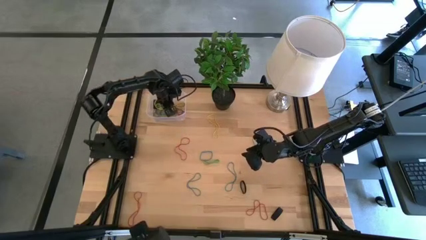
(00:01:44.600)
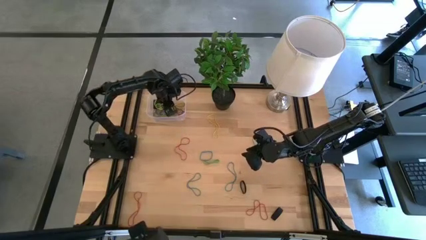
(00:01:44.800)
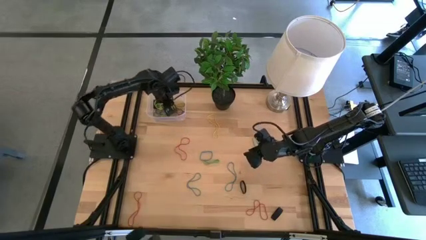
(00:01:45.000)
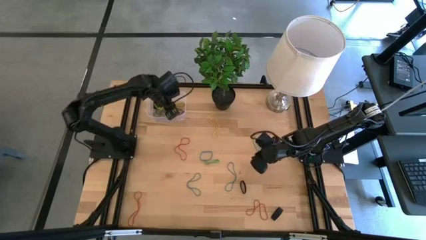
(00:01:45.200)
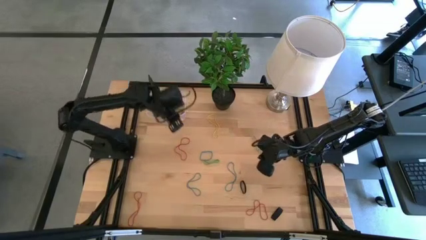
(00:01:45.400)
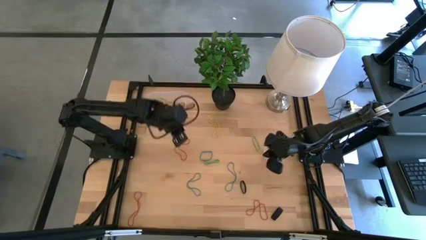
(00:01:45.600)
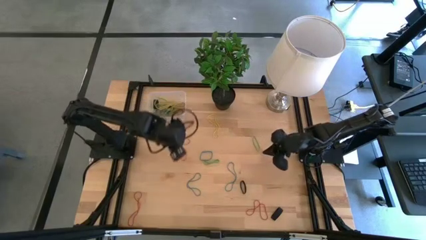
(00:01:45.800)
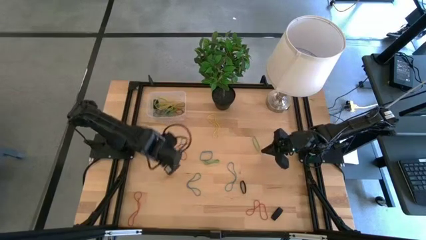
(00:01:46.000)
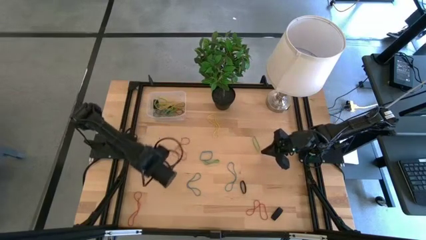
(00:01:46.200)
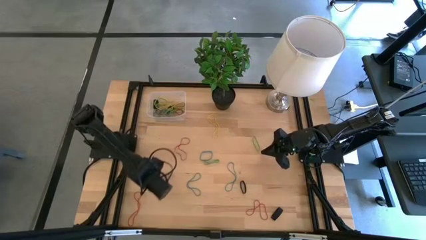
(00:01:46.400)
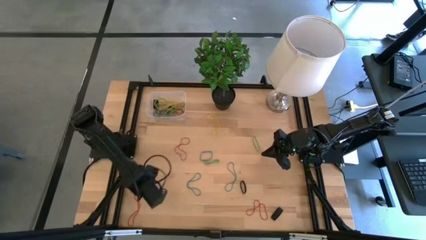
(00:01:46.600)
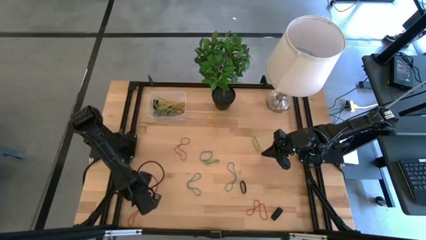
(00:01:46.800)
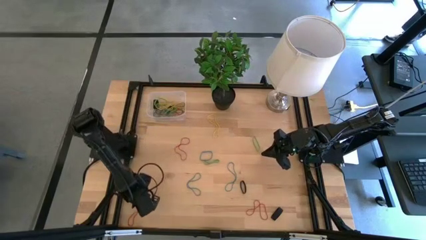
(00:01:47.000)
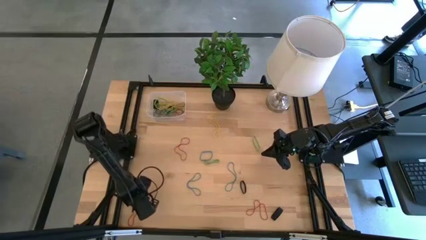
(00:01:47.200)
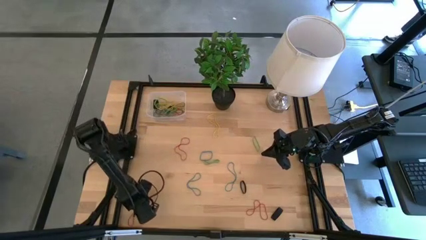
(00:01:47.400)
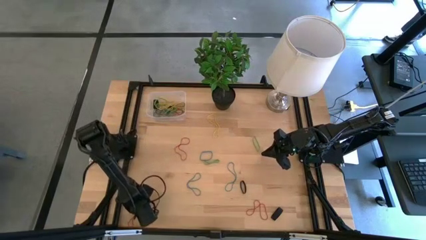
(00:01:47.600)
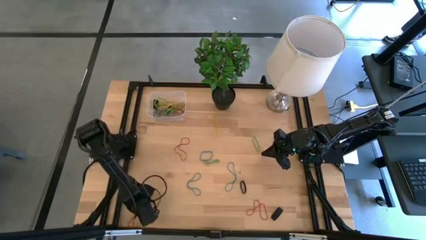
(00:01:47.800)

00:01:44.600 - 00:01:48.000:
Task: Pick and place rubber bands into bin
Put the red rubber band into the transparent bin

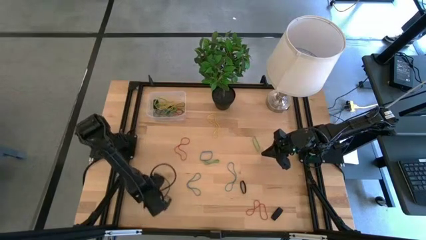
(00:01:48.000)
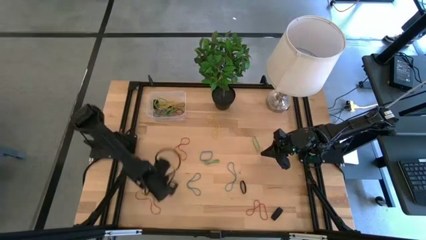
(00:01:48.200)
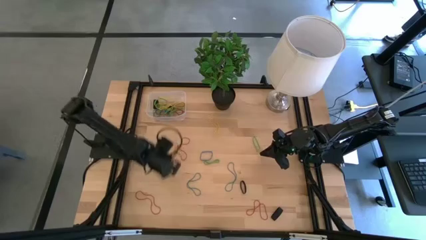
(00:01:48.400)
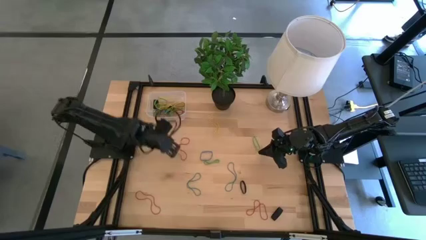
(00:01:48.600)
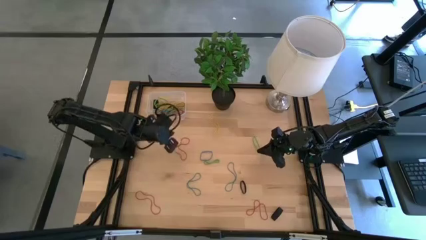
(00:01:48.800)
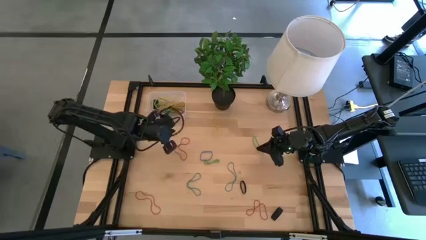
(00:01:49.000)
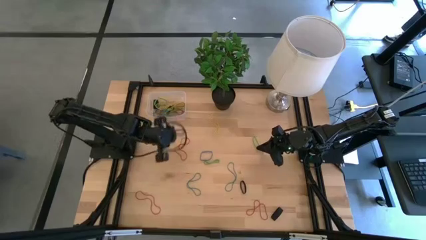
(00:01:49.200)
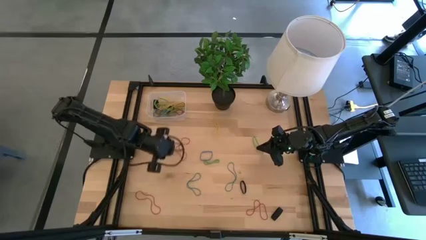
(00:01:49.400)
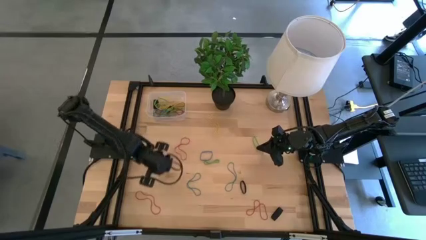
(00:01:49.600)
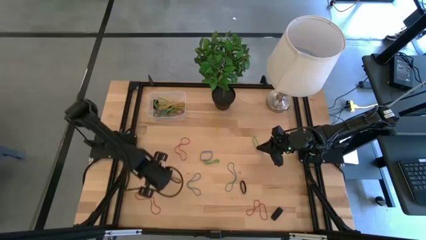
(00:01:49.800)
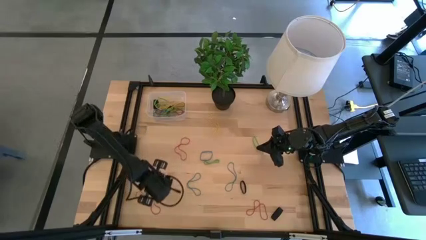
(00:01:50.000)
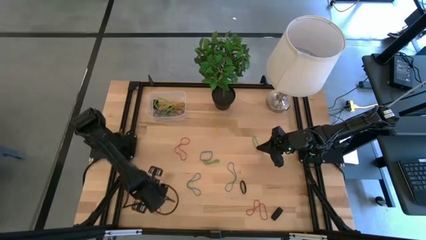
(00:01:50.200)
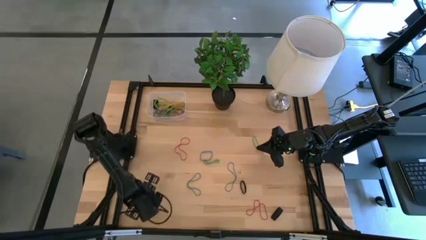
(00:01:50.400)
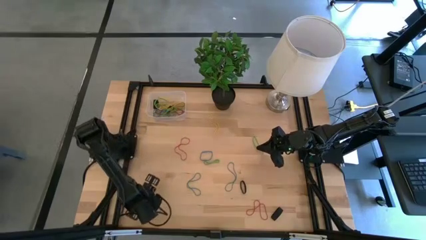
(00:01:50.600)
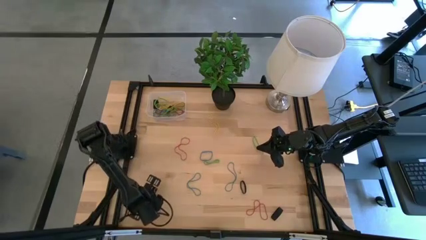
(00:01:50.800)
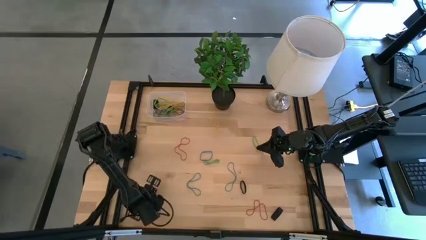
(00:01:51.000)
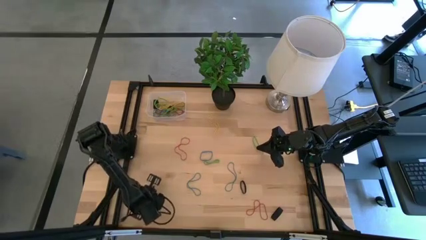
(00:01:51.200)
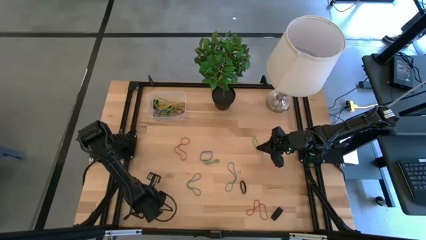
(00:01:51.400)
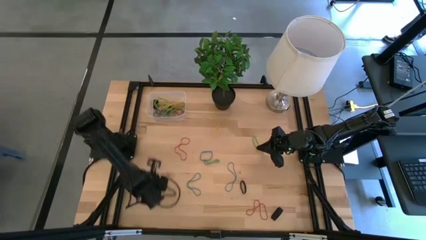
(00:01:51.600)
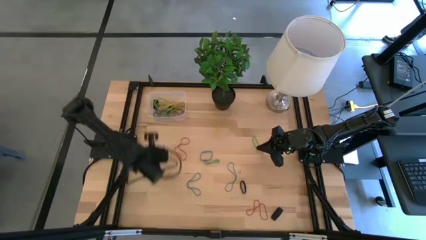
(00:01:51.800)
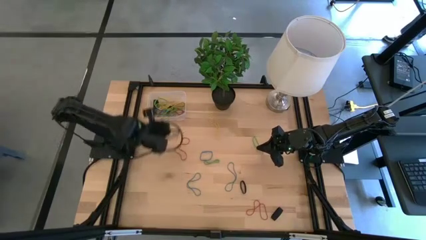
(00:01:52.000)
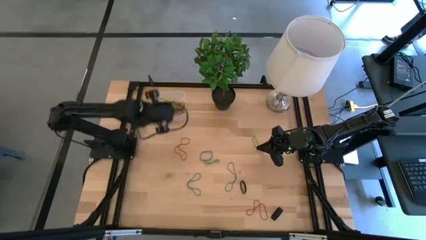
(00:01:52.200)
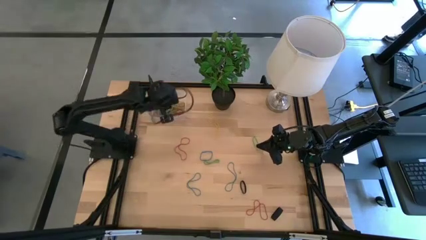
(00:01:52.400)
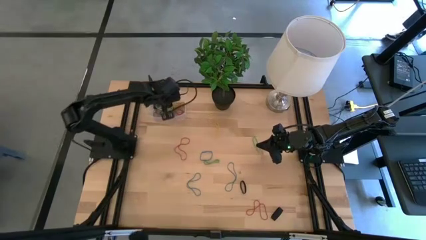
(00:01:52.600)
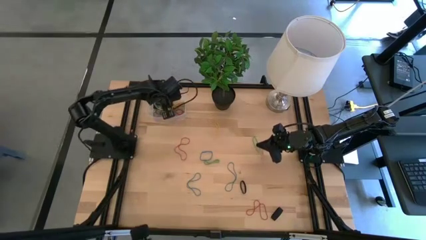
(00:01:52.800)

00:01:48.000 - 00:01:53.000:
Put the red rubber band into the transparent bin

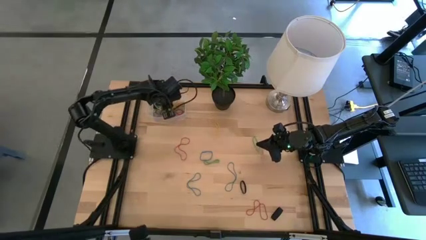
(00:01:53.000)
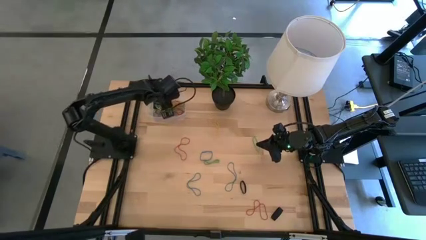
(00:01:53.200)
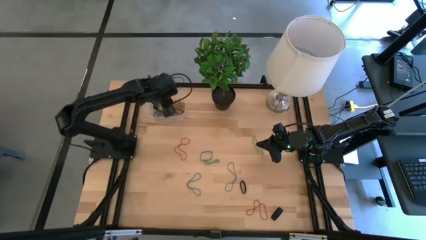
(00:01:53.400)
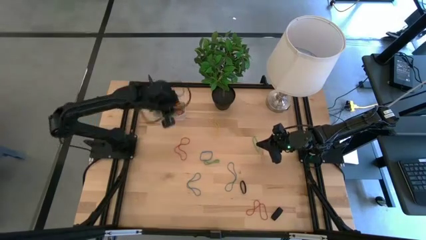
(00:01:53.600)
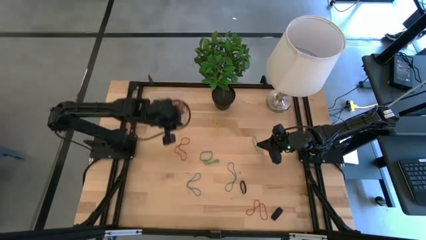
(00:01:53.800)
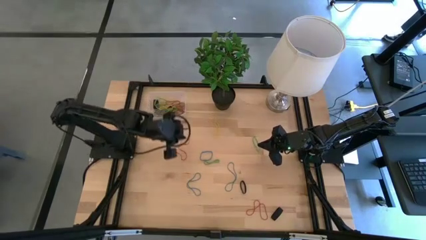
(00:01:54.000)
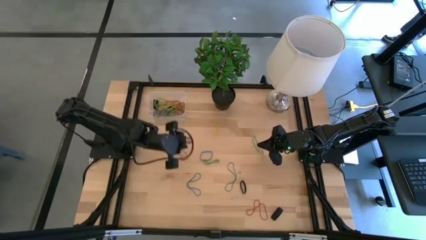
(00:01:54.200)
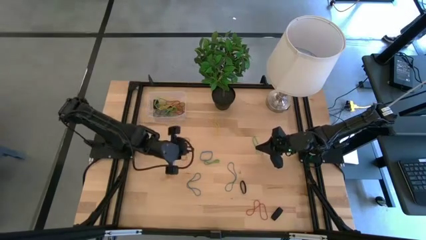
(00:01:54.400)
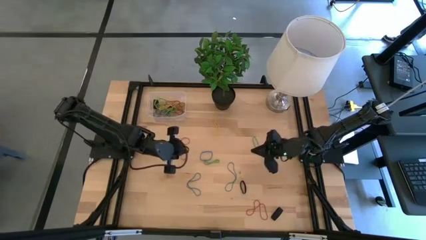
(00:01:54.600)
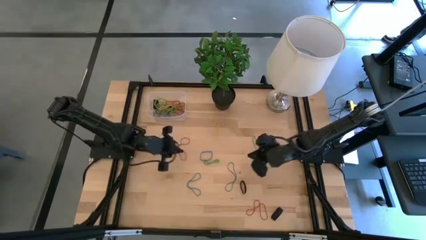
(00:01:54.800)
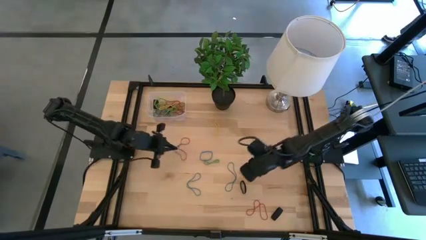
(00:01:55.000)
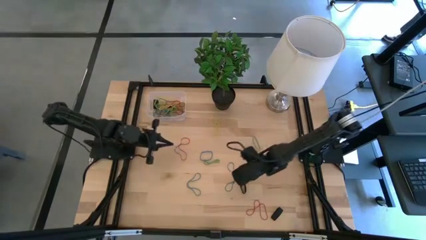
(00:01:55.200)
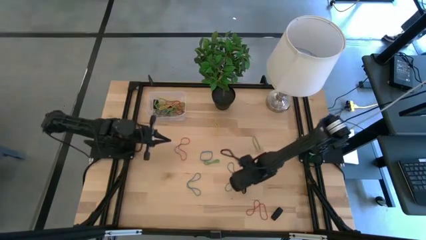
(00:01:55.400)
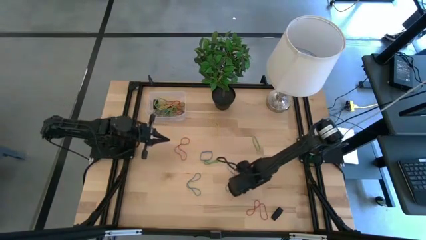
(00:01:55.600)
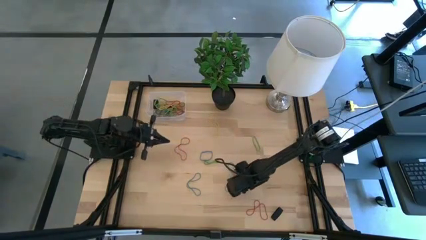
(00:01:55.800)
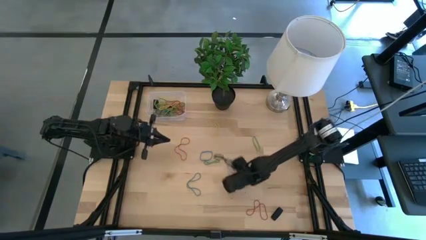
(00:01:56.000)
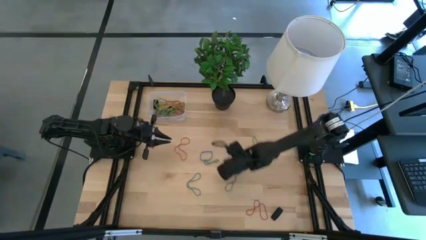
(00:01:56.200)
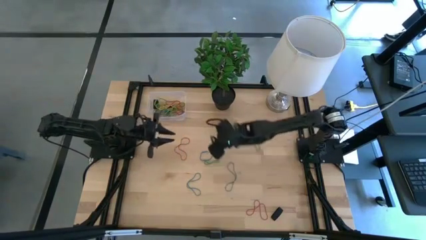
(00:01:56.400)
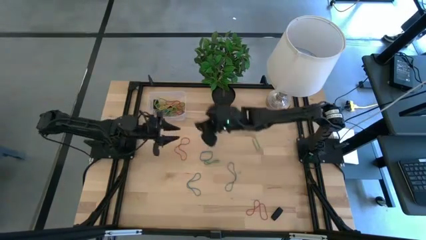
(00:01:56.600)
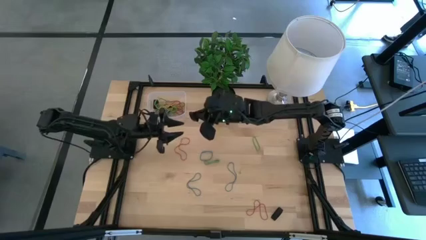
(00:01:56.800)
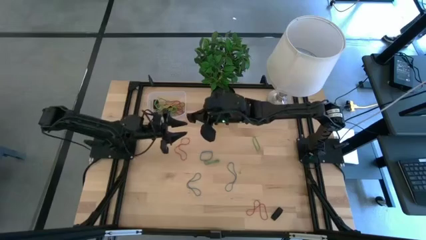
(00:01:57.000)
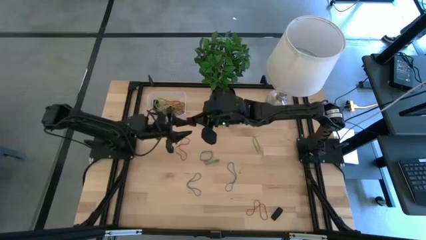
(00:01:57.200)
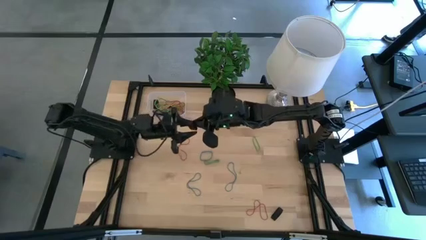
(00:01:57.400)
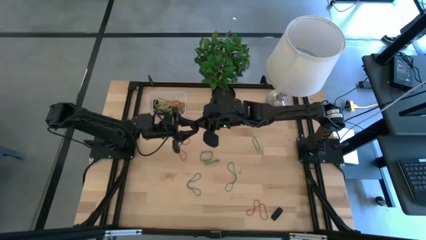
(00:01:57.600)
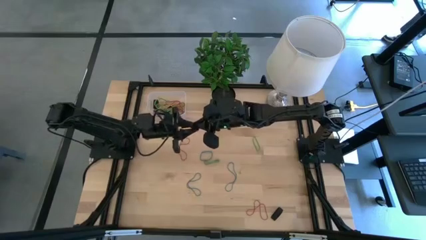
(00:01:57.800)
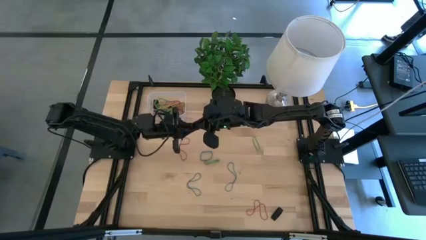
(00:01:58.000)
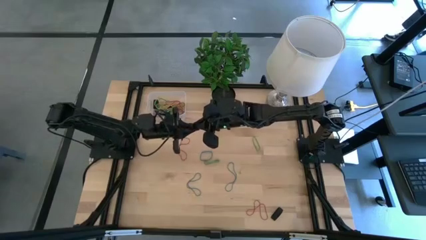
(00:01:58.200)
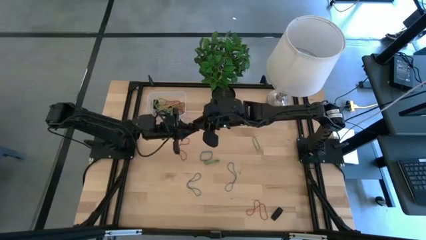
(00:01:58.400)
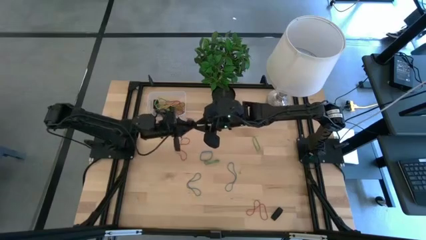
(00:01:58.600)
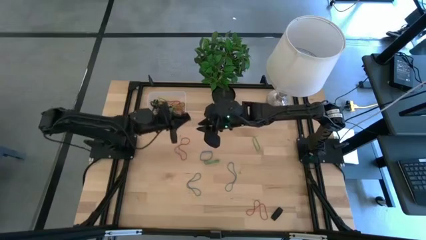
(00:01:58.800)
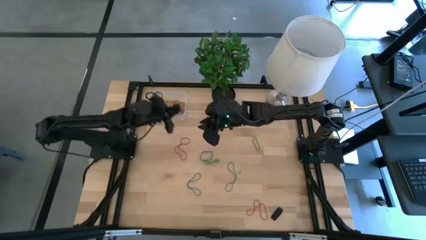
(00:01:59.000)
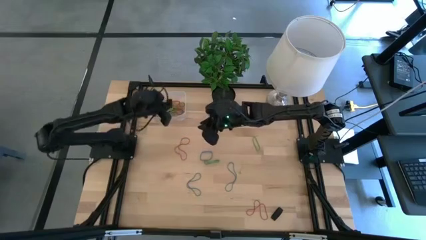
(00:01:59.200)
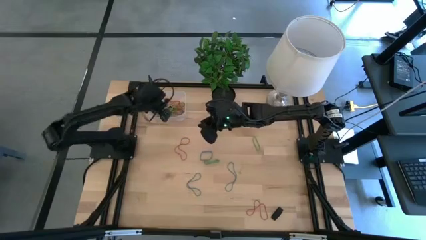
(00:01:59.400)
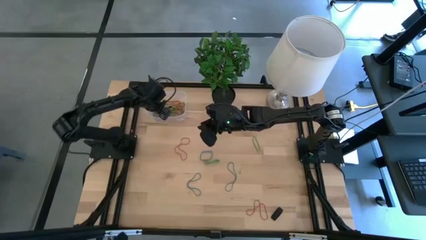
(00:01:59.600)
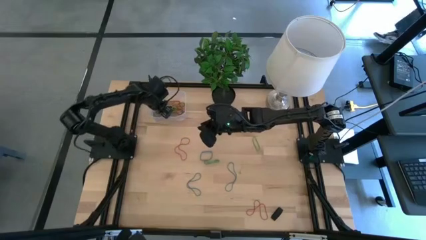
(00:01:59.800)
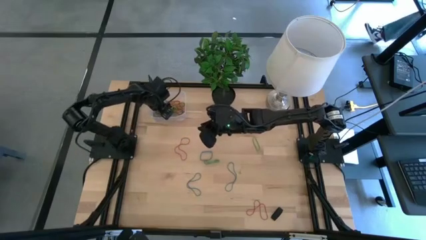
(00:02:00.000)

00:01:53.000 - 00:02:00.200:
Put the black rubber band into the transparent bin

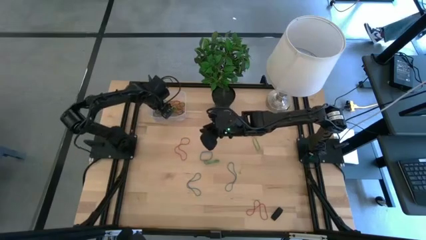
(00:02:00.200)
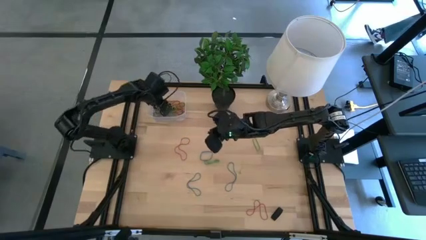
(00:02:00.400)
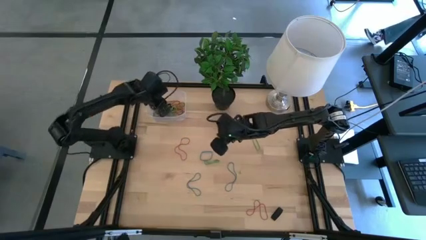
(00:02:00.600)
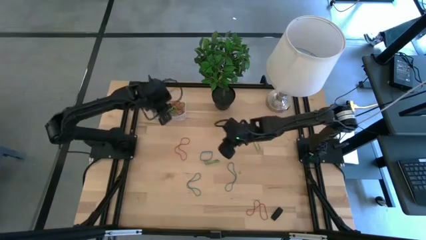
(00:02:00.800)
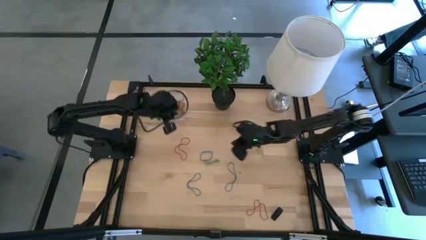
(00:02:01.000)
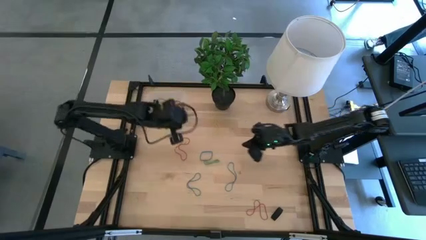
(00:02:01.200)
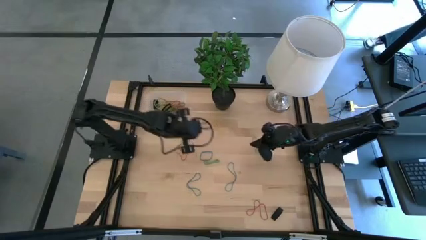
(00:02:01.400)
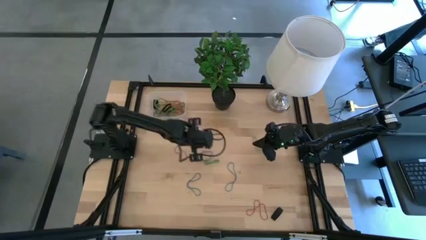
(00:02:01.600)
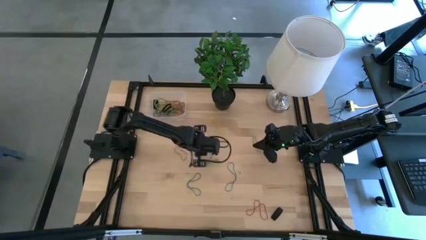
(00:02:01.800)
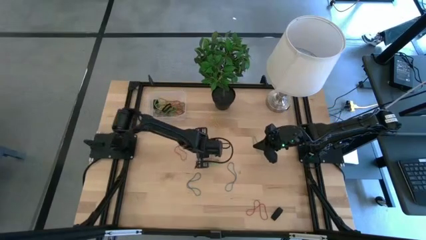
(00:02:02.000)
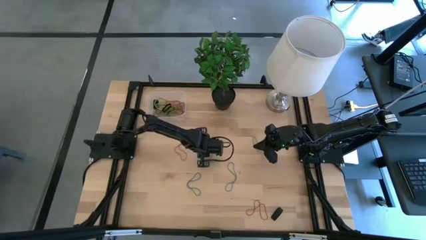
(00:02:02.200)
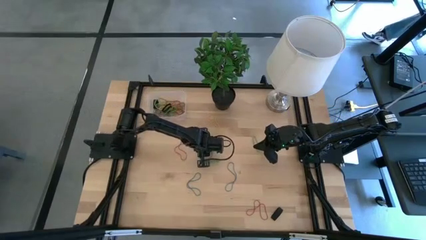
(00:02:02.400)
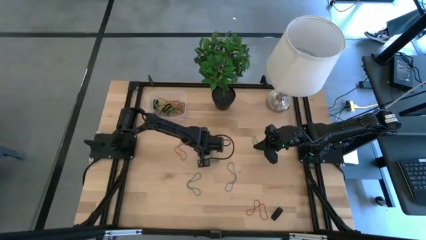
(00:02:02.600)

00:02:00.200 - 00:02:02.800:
Put the blue rubber band into the transparent bin
